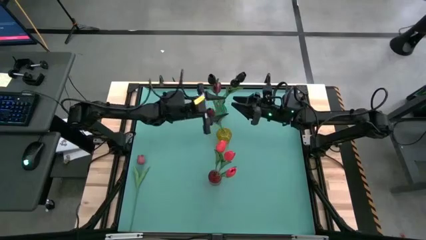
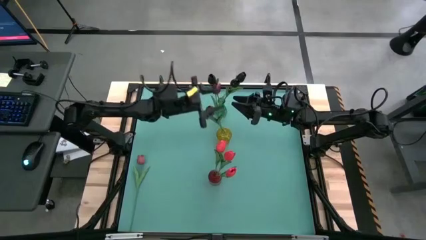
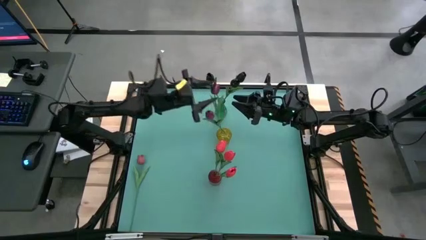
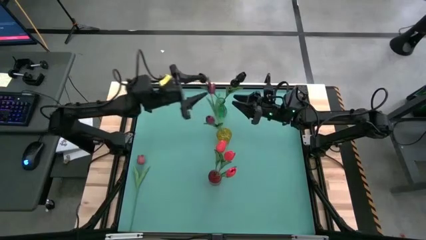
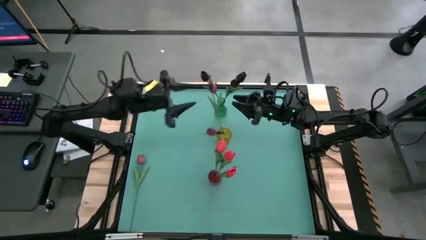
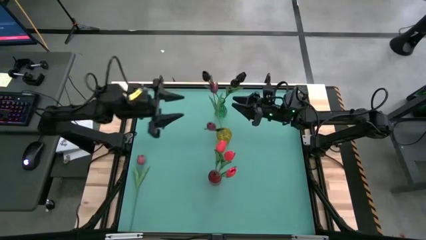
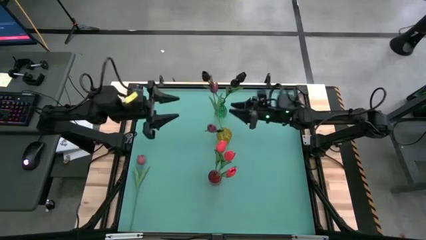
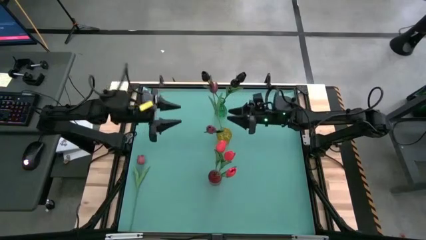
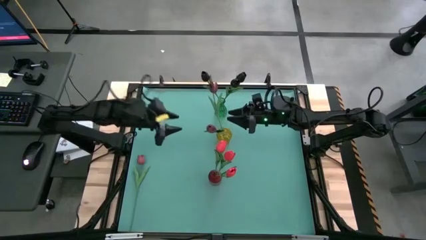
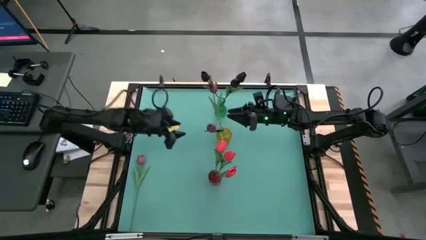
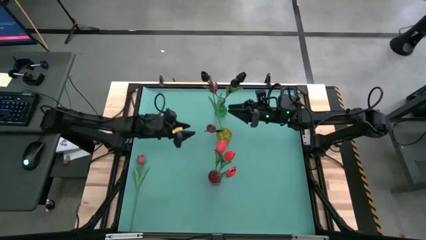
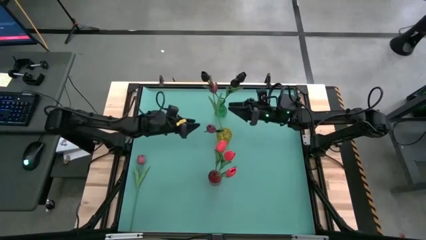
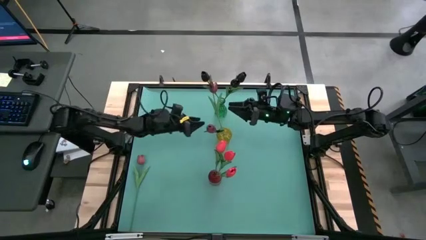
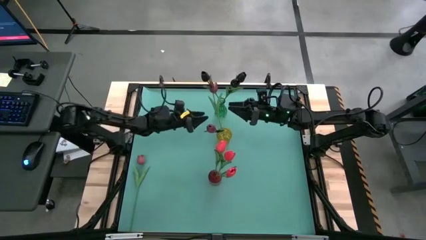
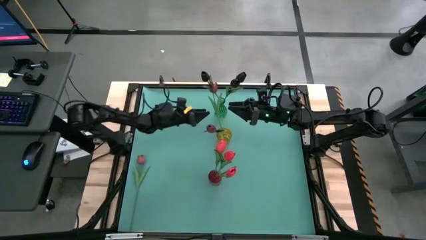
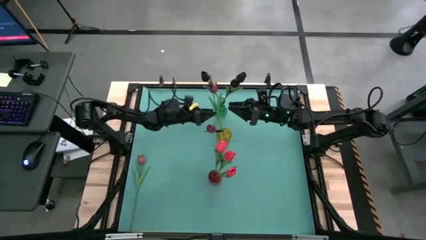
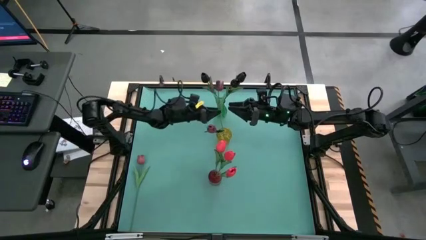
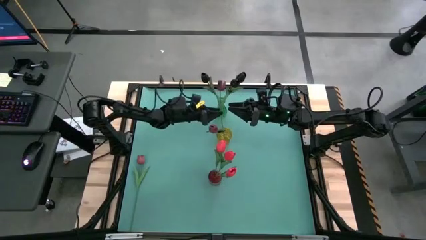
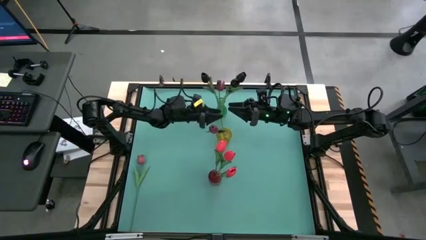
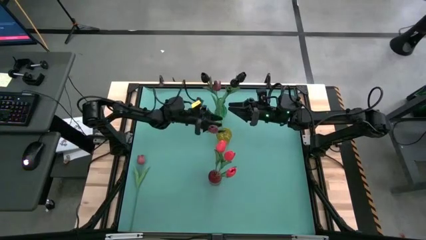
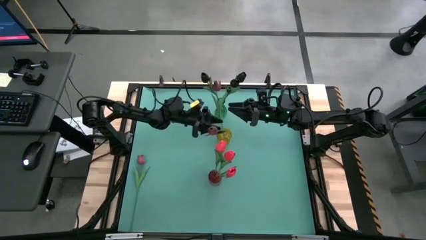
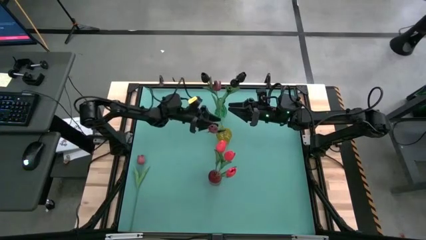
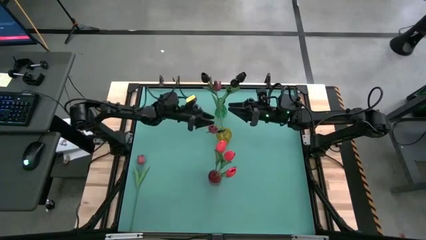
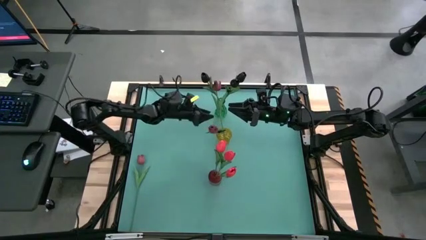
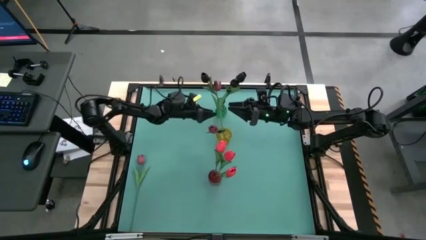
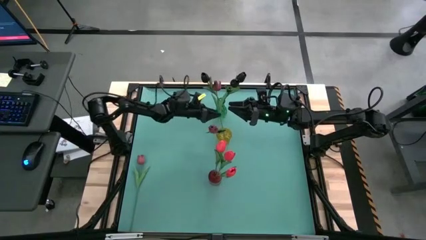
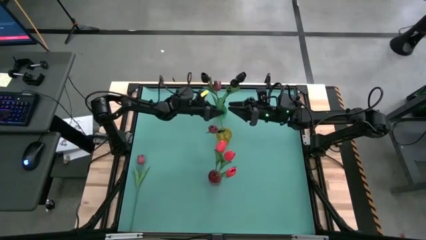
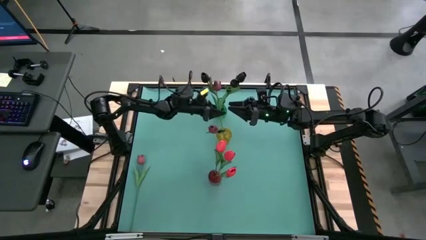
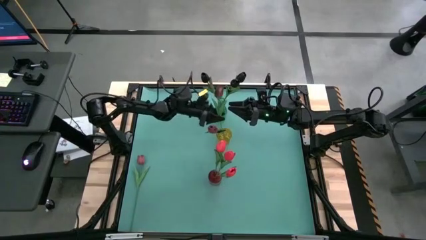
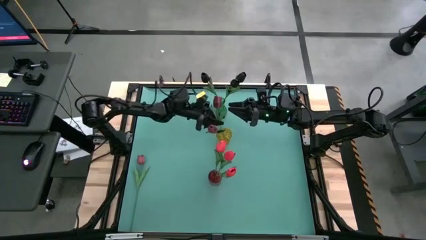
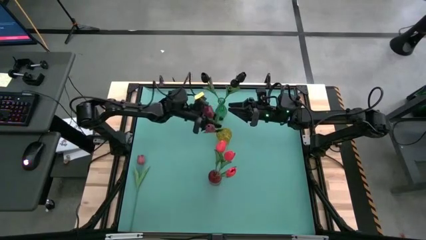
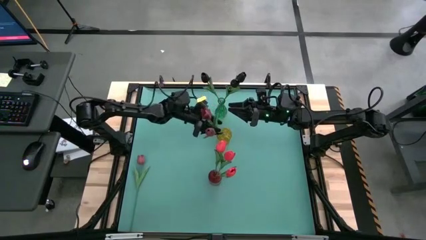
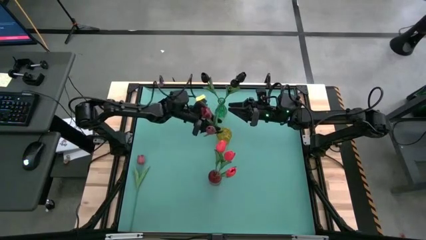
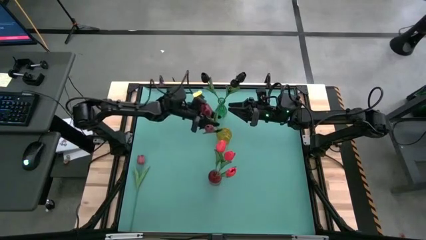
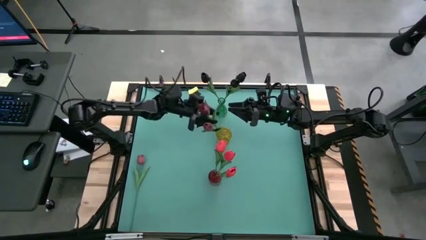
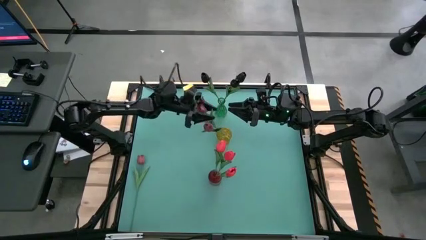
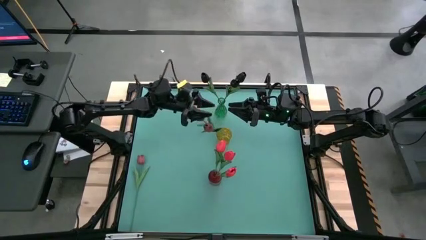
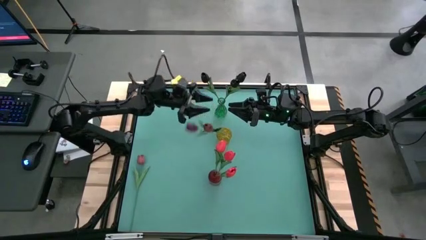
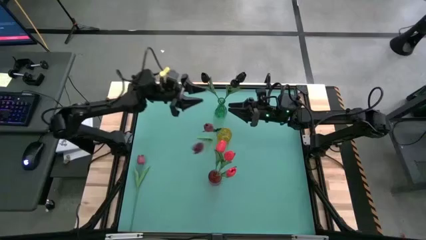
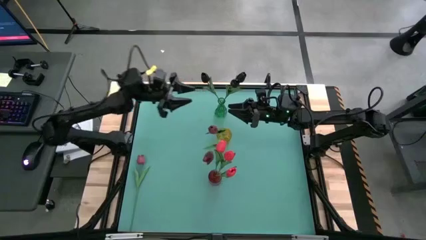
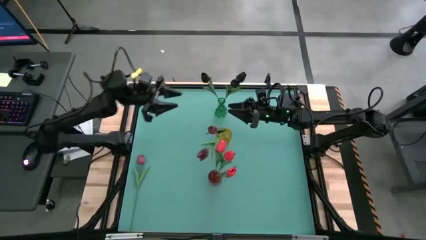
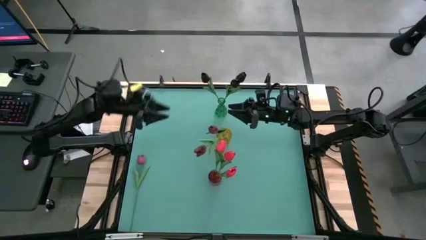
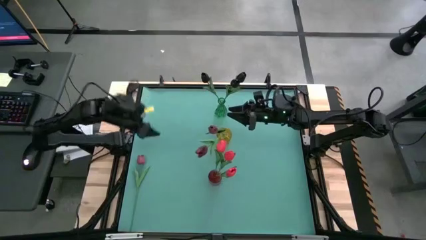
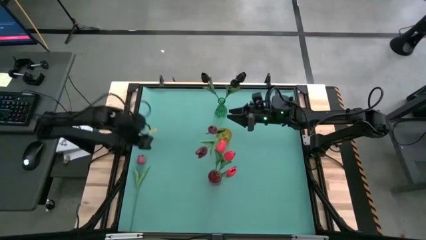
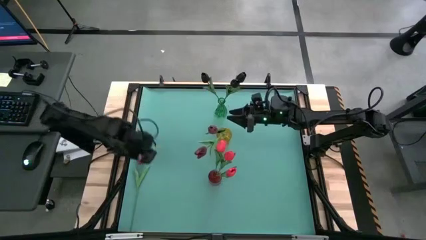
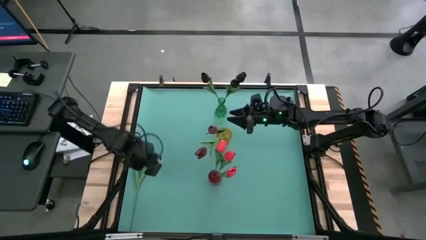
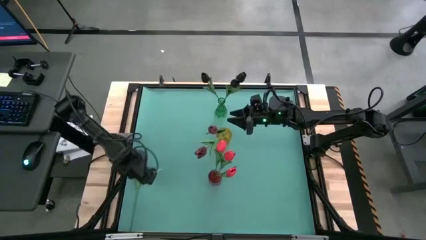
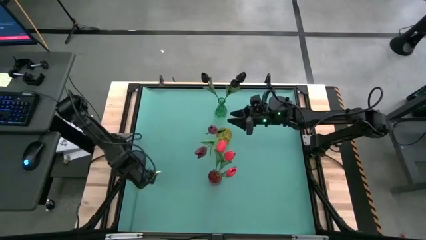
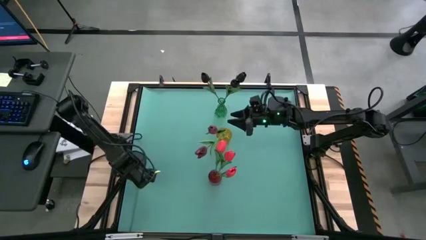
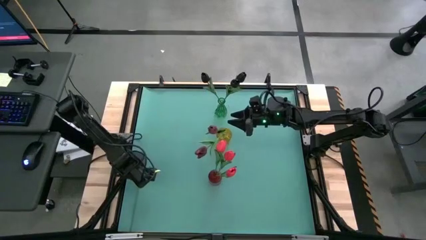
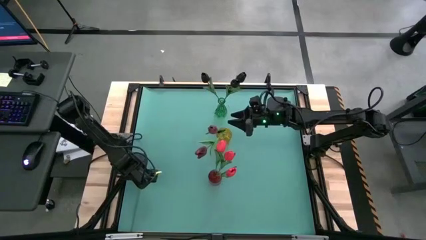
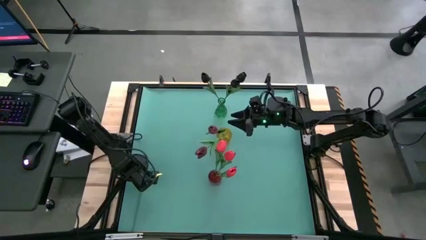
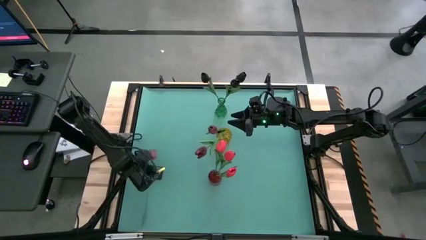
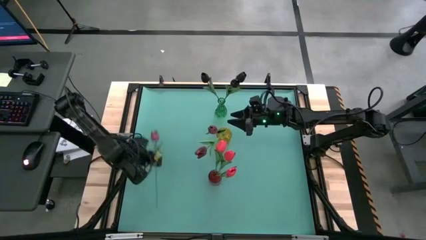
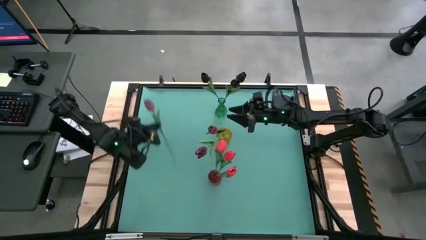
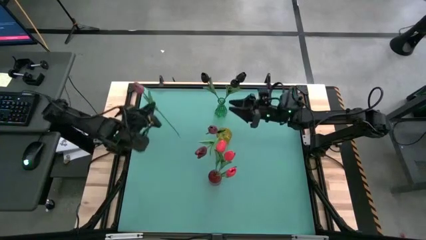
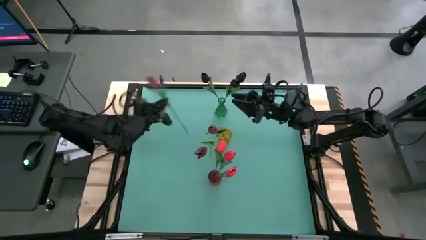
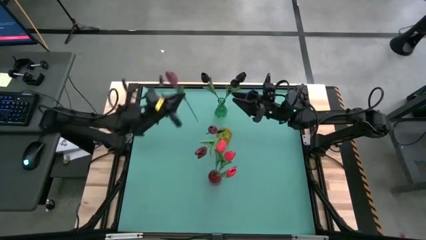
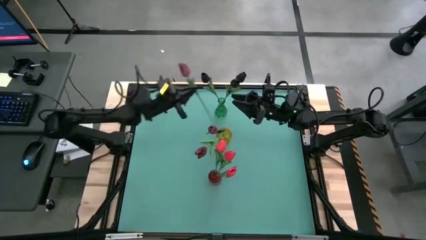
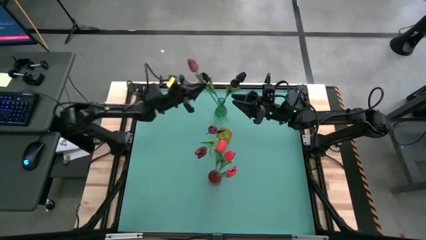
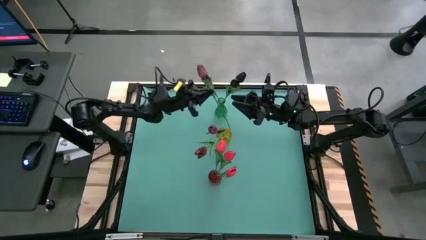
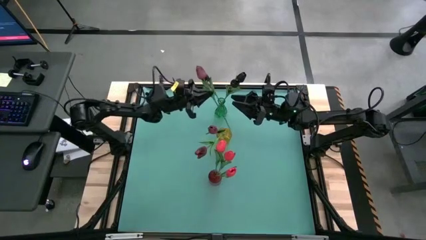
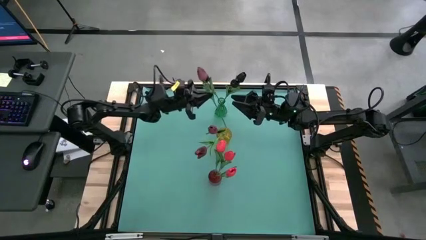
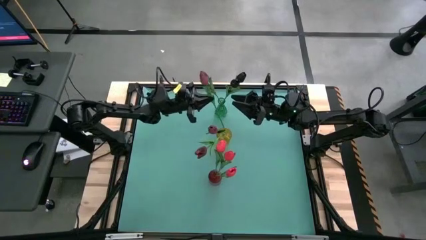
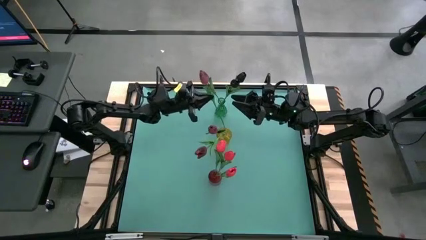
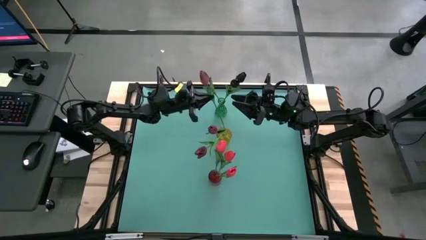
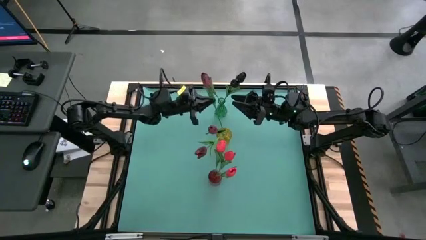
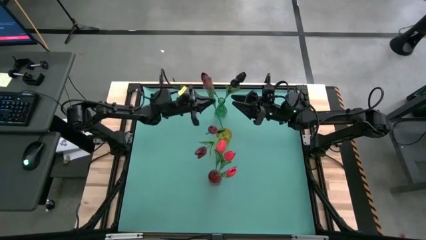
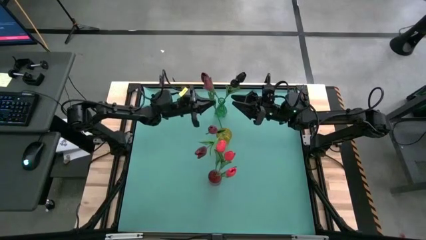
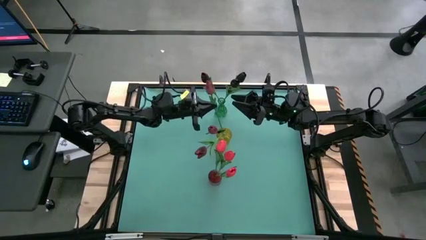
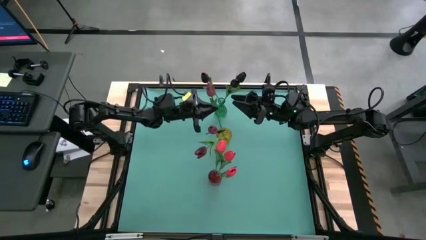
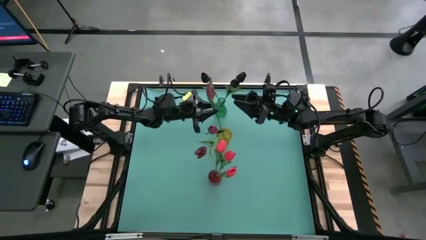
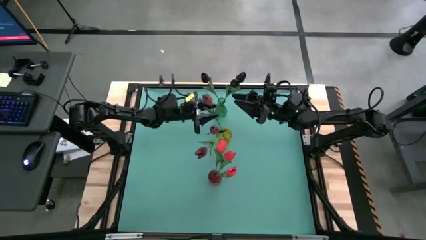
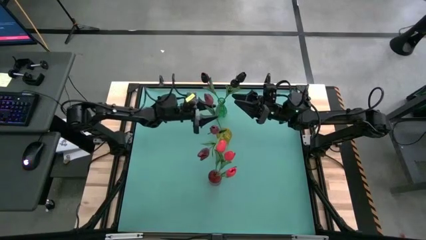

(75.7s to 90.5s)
Task: Sort flowers into vase by color
Put the red tulip into the yellow vase
